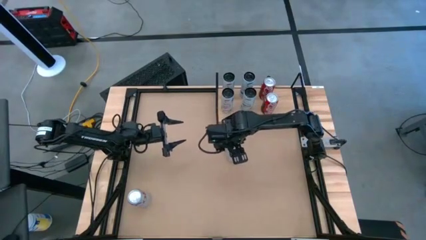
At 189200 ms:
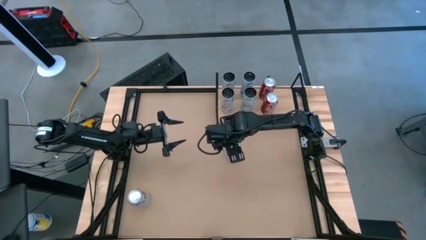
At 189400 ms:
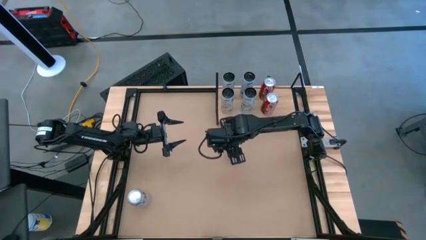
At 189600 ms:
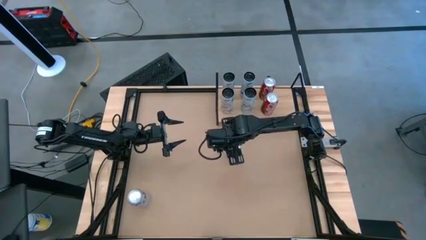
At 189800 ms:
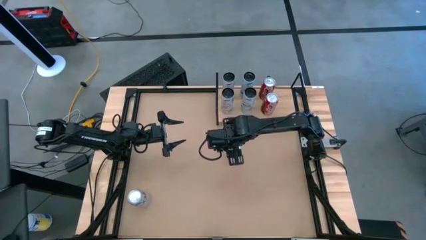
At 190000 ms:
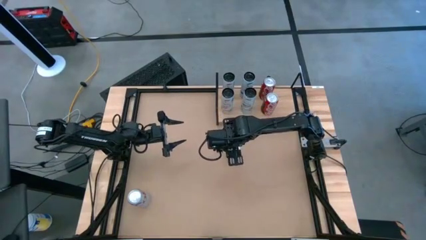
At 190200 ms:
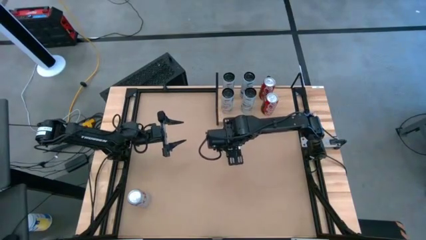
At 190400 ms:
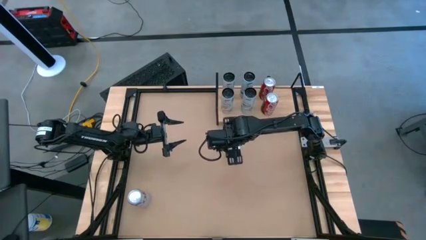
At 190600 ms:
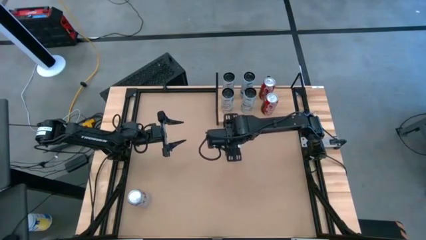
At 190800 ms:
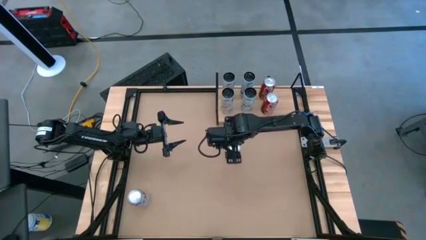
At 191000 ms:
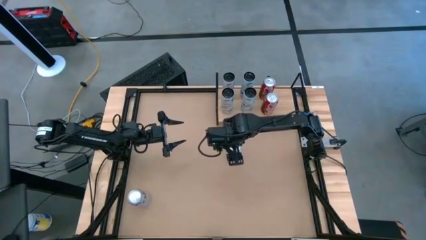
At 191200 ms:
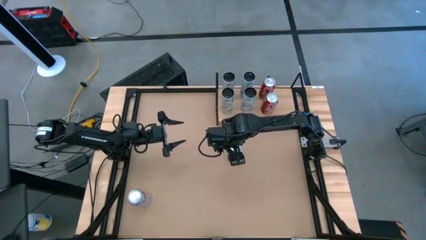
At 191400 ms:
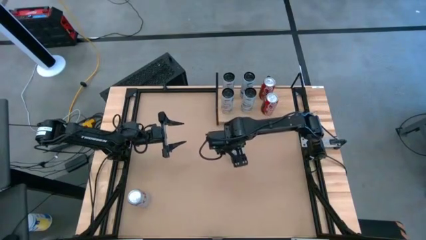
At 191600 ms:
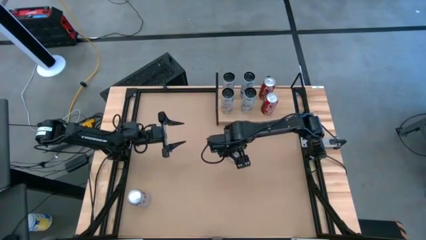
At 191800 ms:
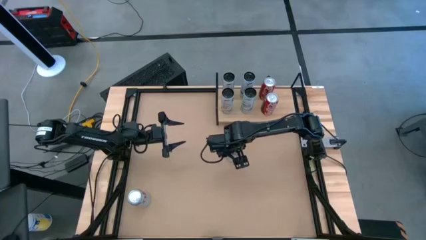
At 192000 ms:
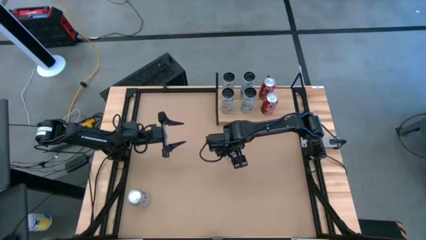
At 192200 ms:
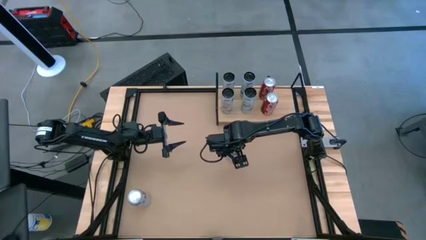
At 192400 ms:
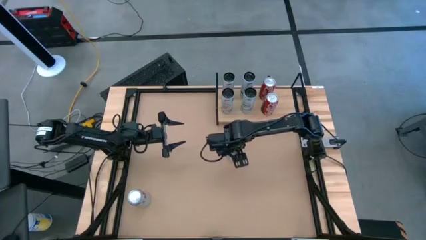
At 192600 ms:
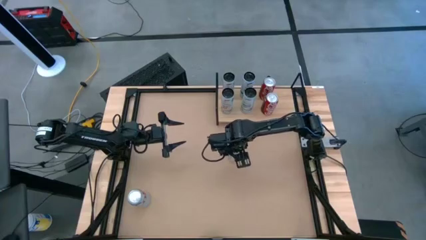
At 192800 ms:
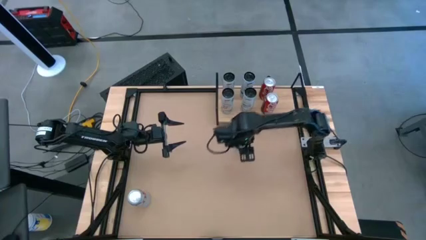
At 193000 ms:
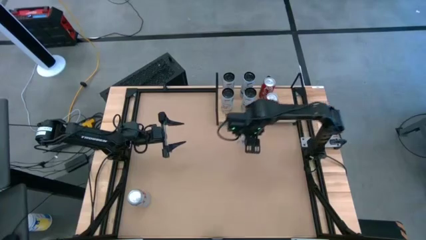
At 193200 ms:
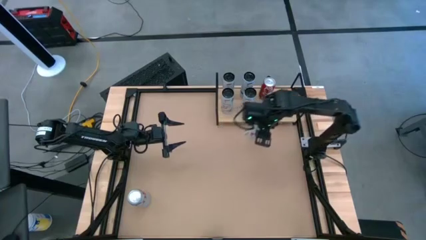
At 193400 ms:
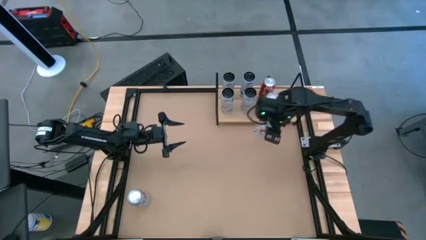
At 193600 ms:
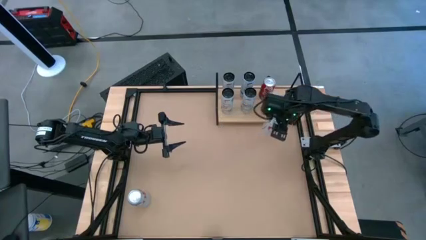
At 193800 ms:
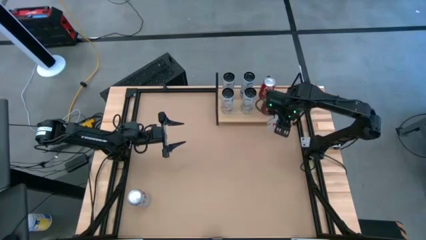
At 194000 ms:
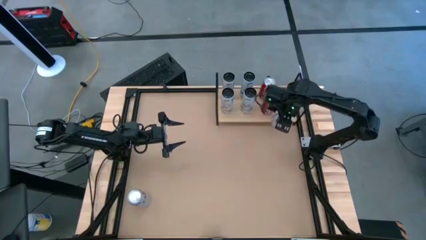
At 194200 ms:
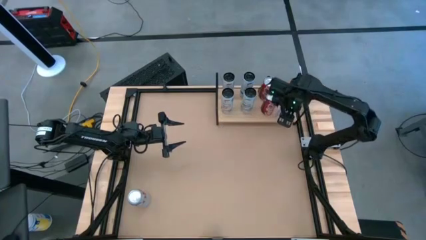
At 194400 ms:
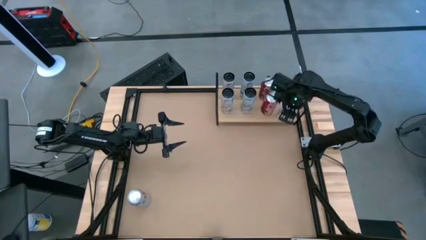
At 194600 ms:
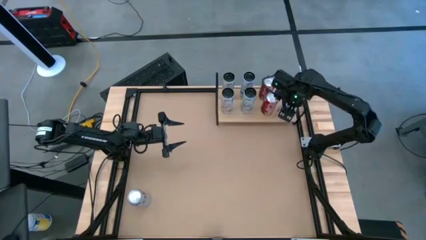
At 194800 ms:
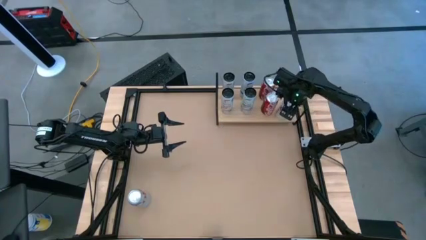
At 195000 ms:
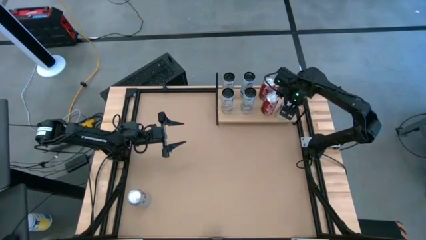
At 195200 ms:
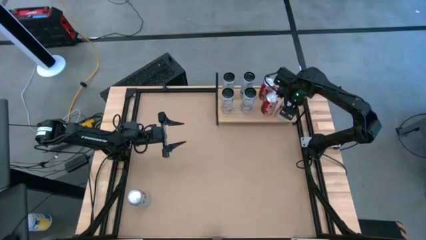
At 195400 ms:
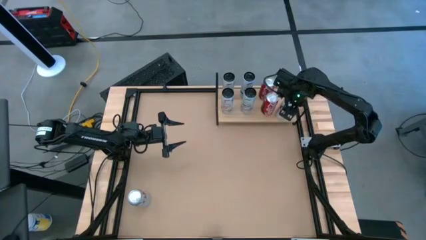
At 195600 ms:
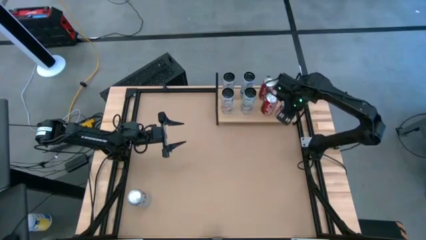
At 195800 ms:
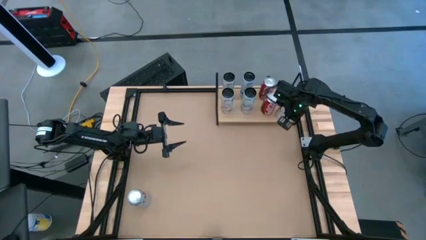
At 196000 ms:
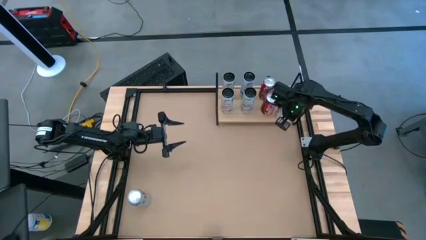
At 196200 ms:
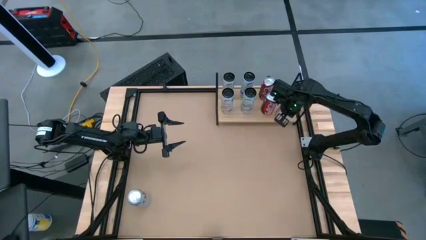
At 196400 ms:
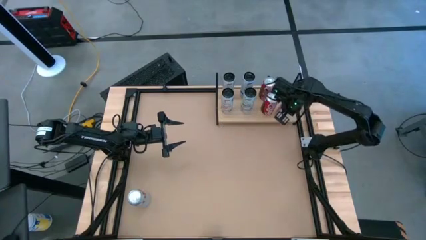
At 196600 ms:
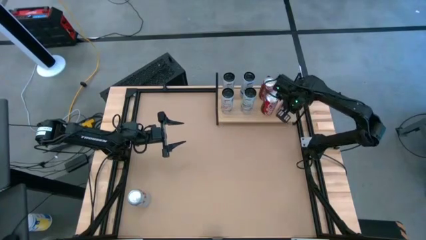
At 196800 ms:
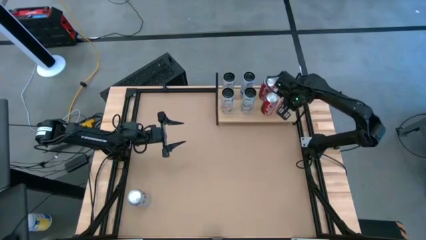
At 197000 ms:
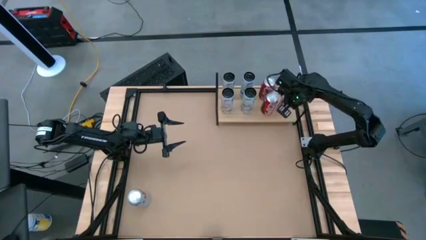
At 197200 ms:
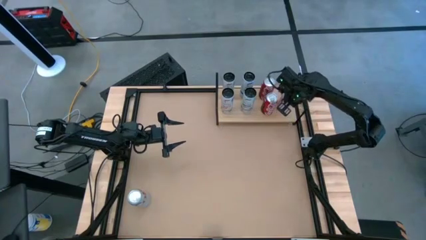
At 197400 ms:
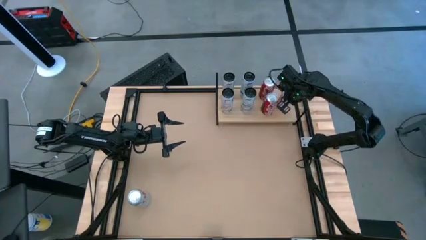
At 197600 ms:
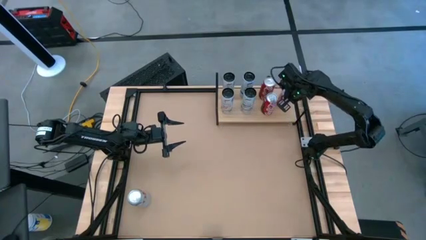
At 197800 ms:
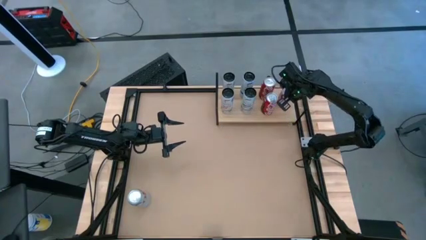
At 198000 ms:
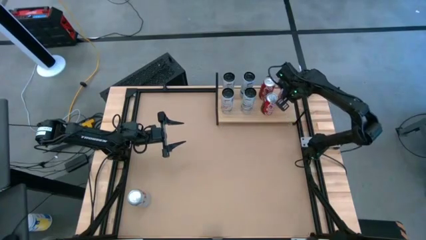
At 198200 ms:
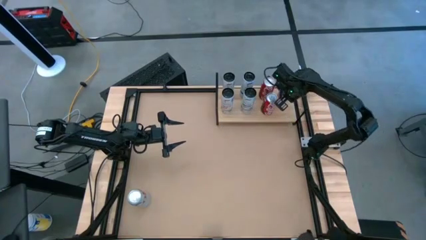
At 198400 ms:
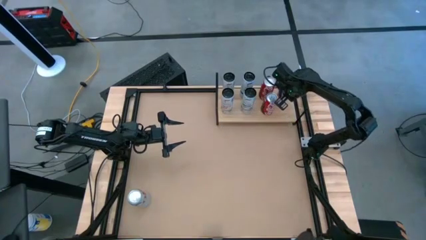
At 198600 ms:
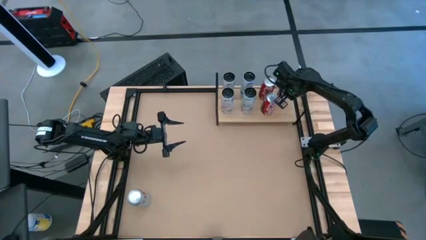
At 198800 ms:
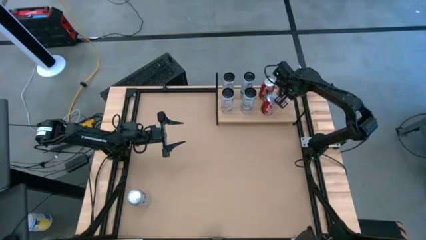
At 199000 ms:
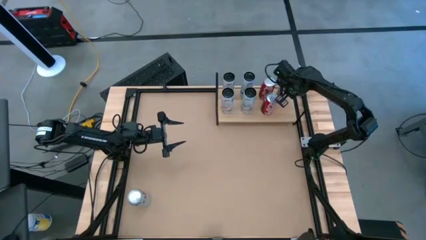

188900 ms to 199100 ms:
Task: Place canned beverage on shelf
Put the bottom silver soda can on the shelf

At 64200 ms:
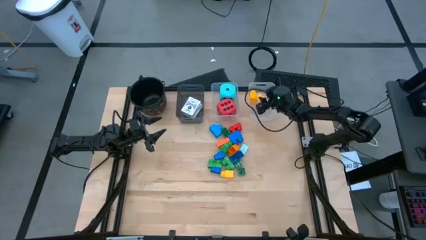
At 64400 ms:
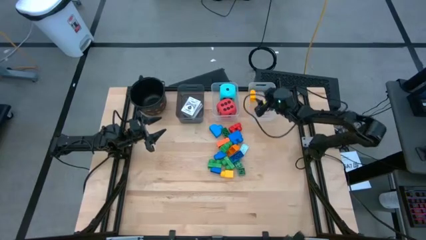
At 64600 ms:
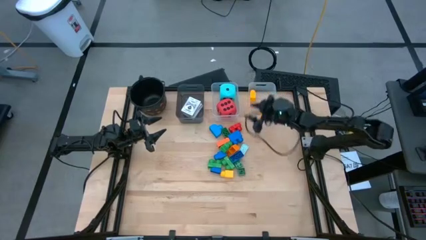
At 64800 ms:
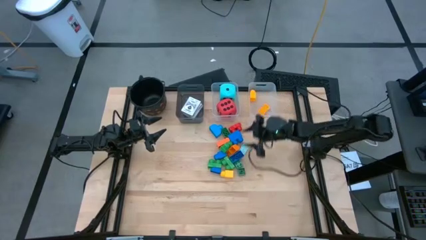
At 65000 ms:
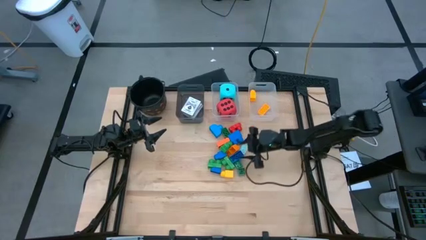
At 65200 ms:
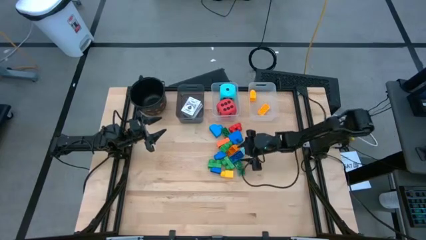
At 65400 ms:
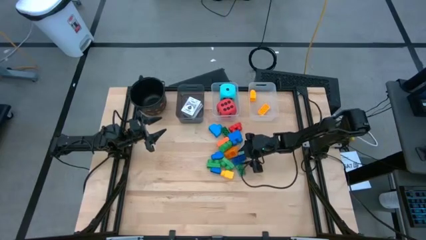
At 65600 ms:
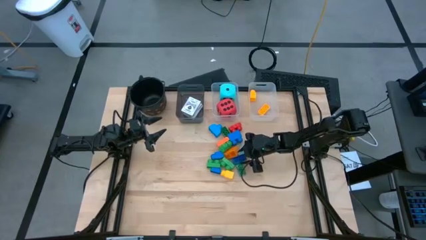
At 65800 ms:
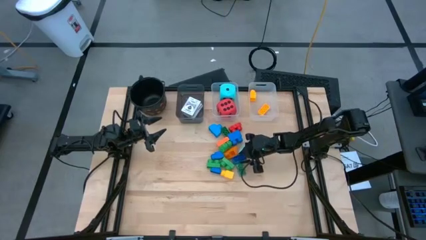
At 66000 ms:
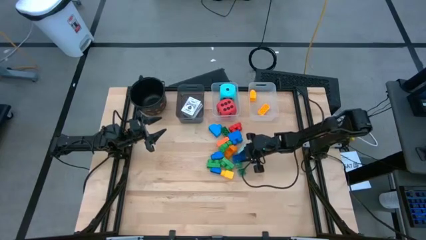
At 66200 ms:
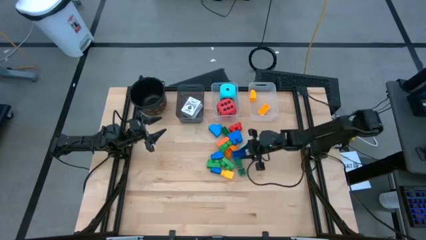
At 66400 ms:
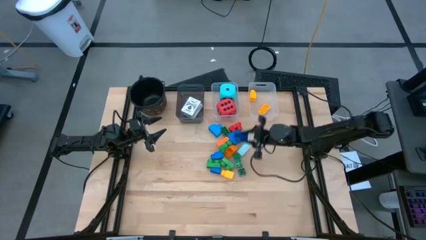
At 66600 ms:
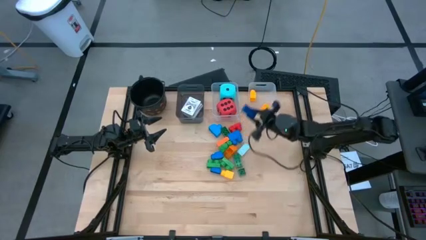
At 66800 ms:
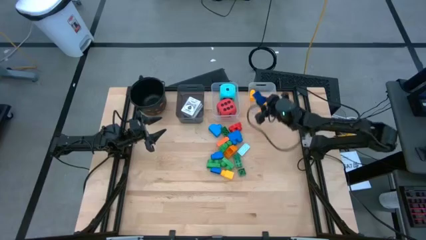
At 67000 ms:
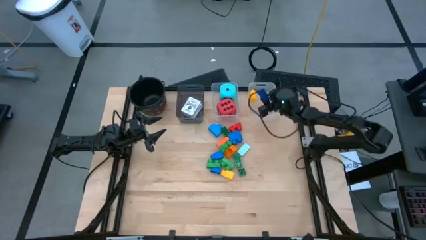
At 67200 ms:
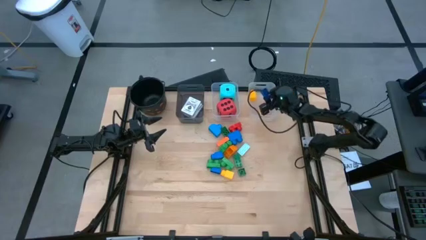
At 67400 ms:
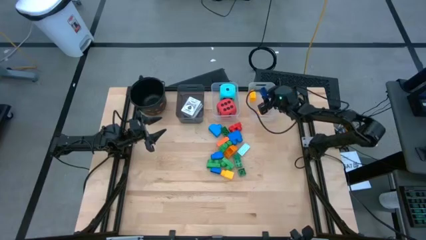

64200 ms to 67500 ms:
Task: Pick & Place Toys
Put the blue block into the right transparent bin

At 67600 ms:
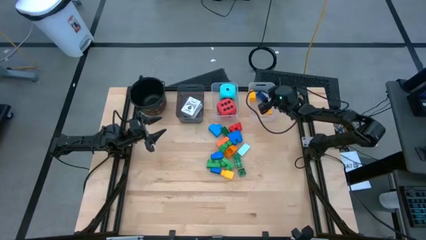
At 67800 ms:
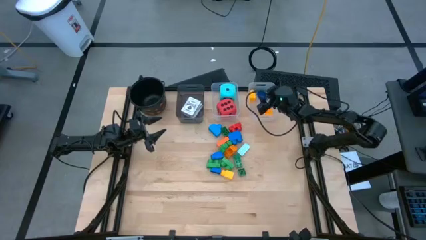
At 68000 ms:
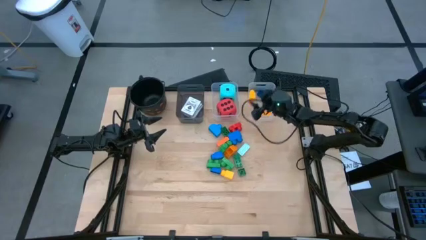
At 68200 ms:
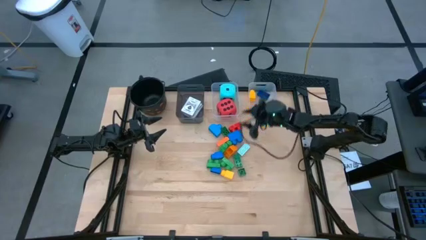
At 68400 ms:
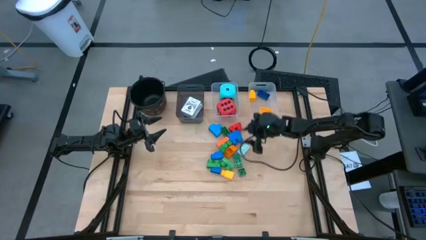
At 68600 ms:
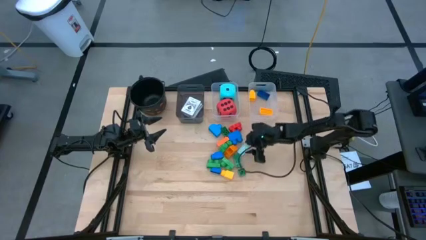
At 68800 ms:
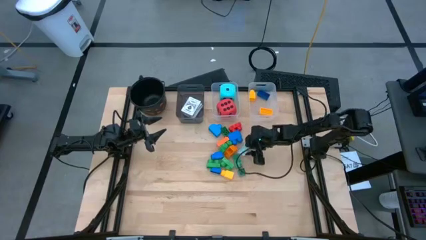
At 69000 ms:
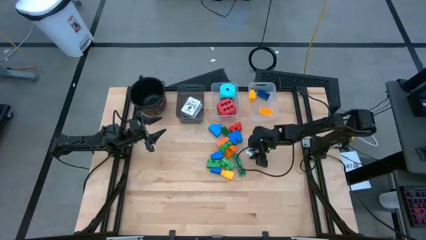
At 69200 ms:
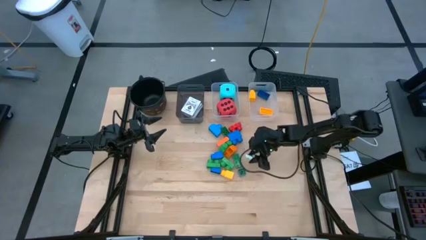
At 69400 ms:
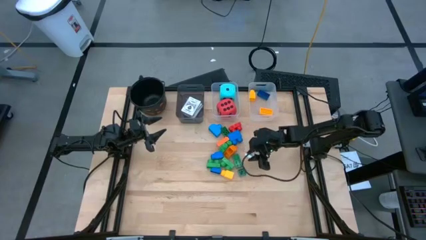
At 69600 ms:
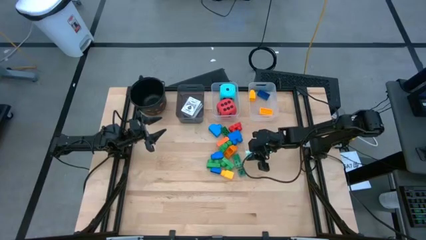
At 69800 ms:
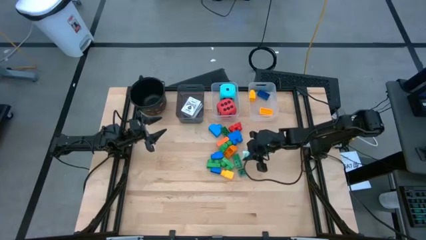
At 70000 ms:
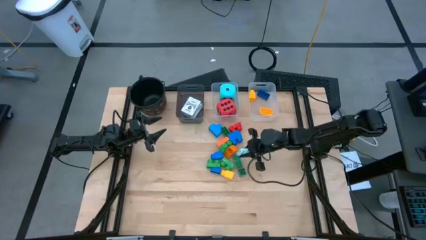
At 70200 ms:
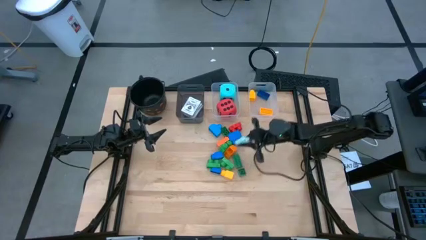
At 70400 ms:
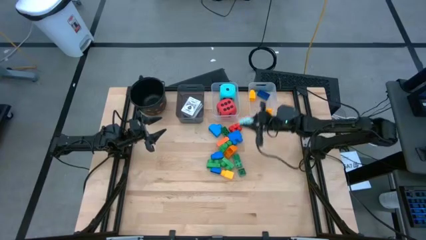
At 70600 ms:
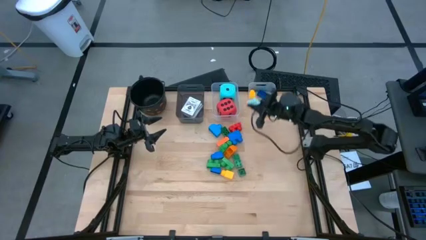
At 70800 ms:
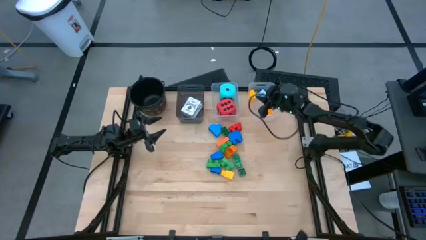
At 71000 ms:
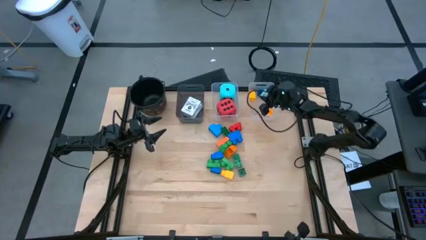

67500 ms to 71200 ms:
Put the light green block into the right transparent bin
